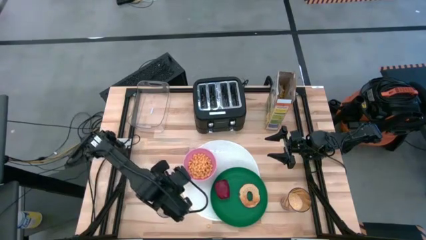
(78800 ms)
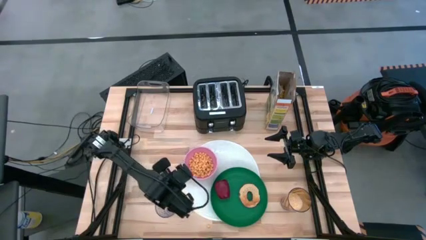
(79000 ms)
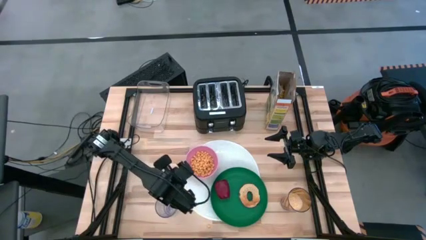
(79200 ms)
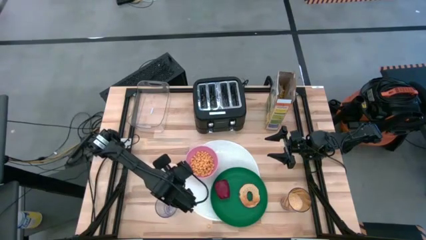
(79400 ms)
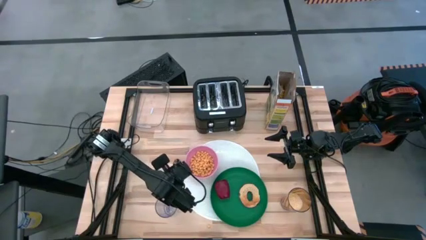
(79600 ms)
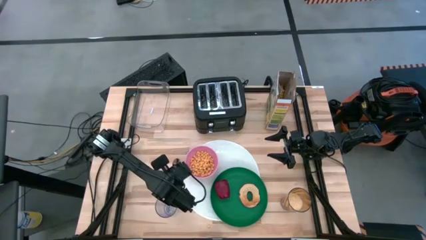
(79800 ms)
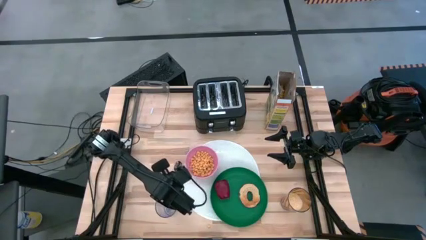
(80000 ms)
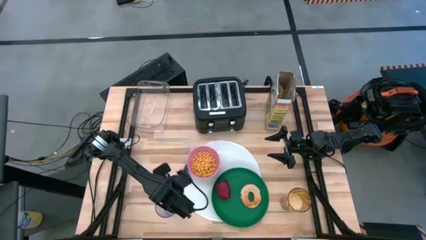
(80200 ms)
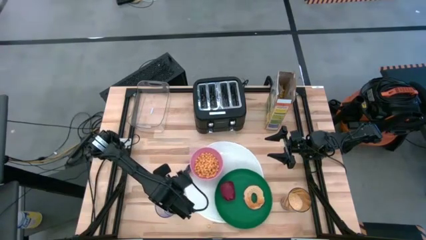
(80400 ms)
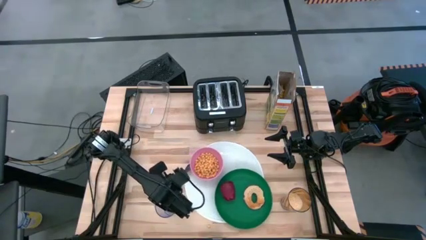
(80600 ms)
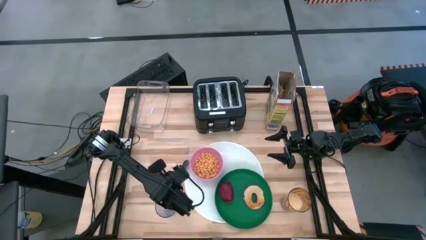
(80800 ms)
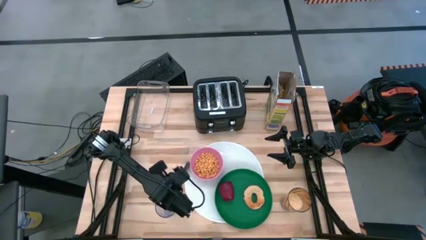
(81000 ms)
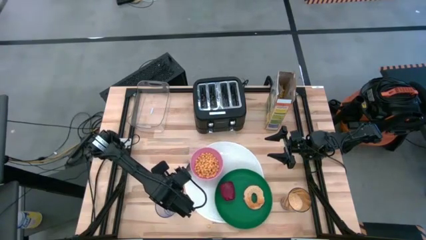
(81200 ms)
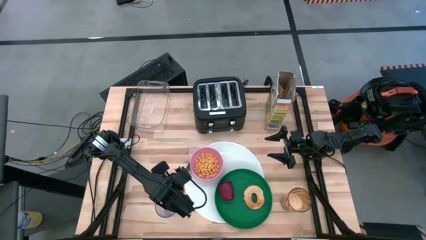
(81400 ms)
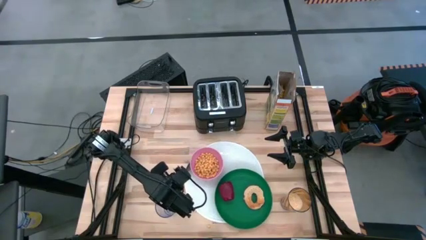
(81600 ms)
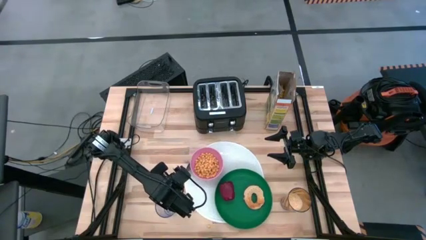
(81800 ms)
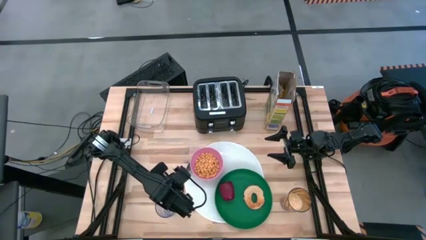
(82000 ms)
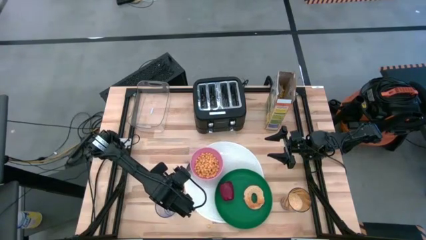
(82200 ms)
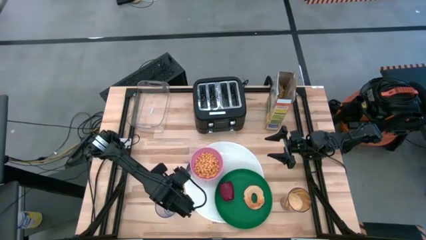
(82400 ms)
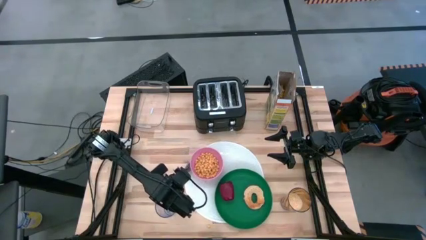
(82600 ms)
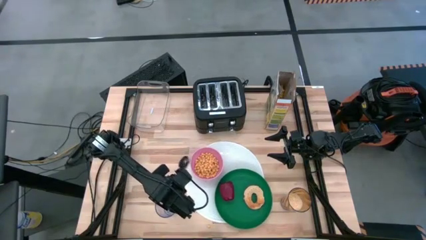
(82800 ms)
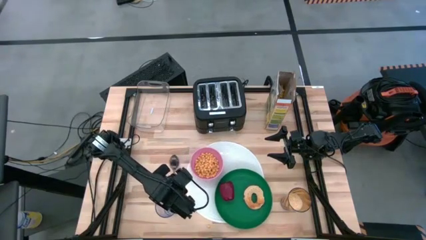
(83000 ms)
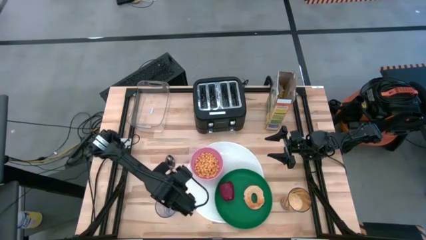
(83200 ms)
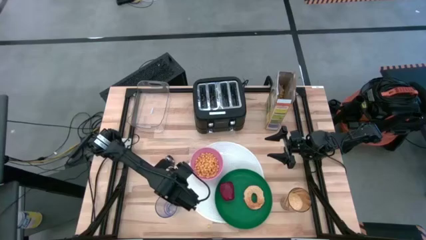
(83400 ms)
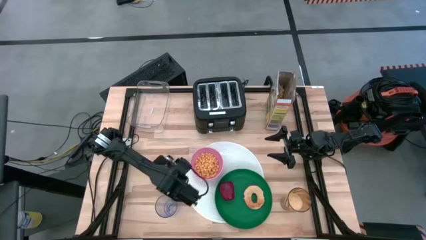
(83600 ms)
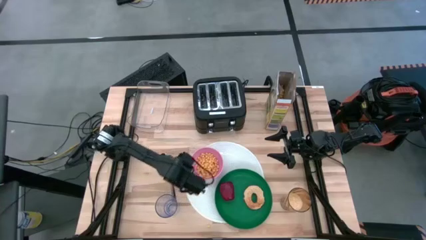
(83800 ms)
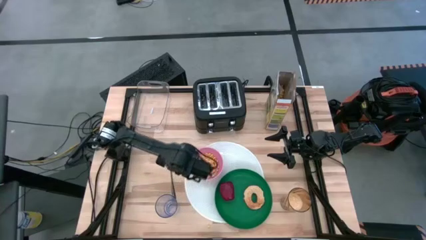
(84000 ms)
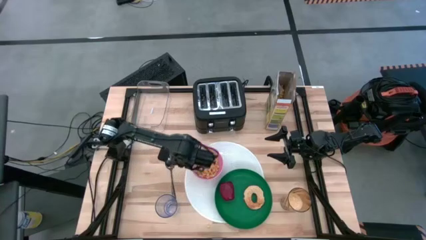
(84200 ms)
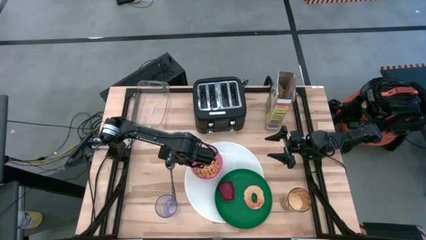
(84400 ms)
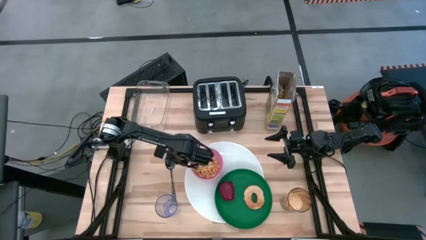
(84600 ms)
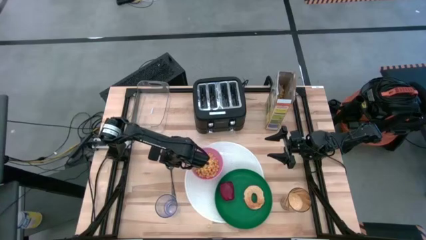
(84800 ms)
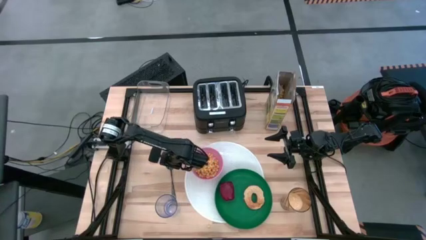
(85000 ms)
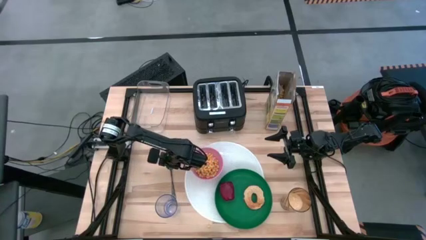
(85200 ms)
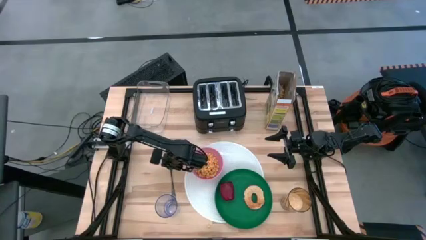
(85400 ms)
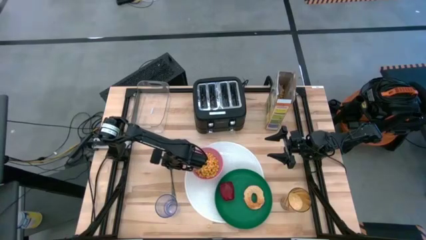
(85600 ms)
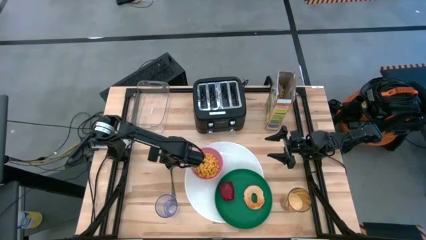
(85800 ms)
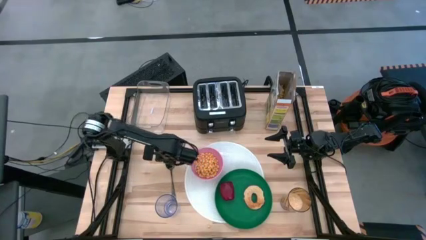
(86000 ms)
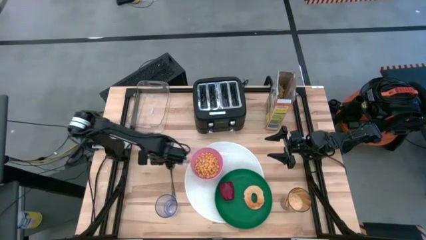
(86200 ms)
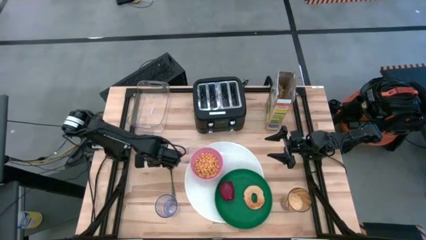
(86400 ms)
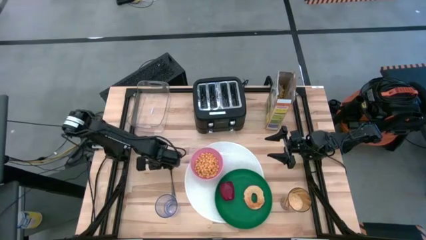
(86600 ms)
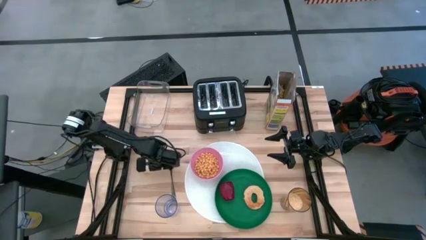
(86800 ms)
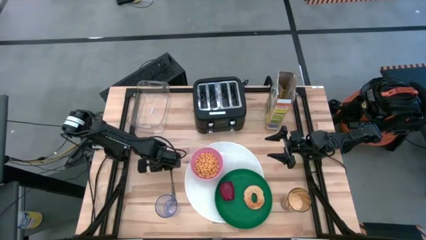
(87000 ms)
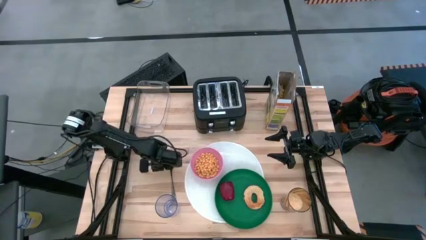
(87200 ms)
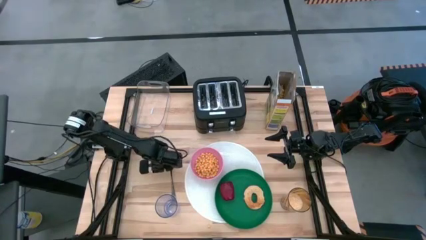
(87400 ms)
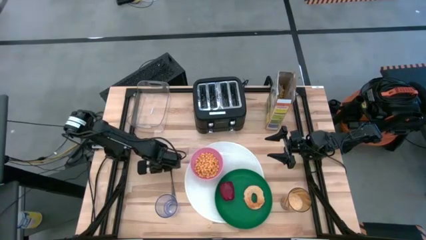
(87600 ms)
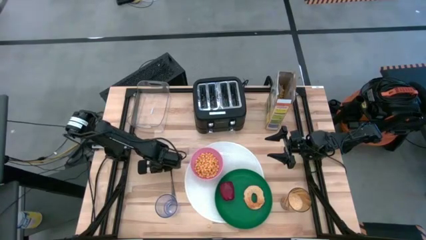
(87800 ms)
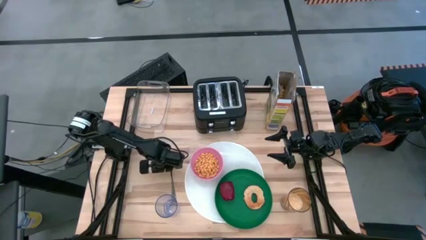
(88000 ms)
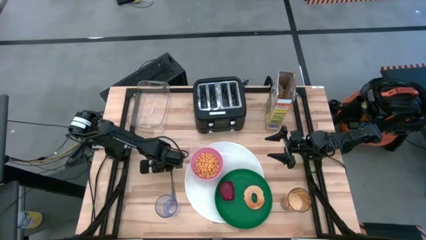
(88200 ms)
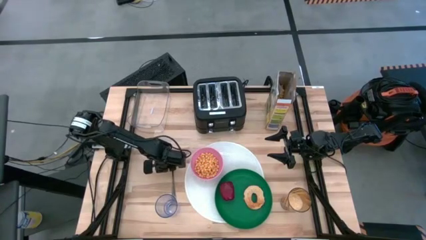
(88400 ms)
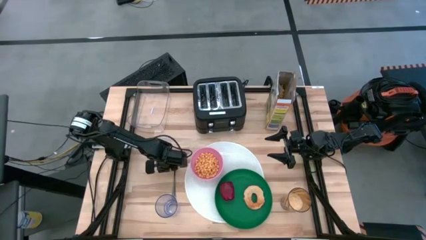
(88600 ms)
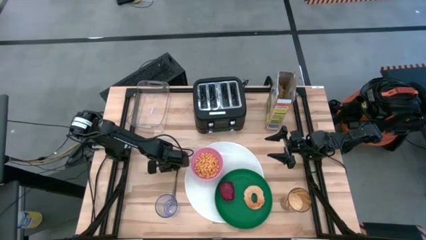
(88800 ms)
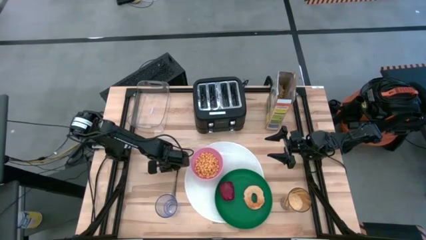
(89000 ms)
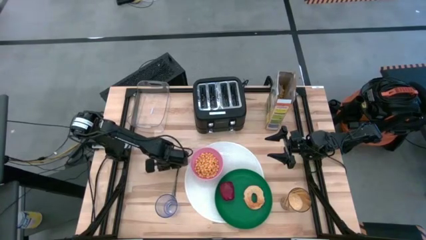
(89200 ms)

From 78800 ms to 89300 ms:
Task: Arrange a breakfast setting
Put the silver spoon on the left side of the white table mat

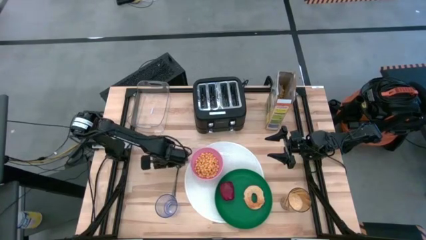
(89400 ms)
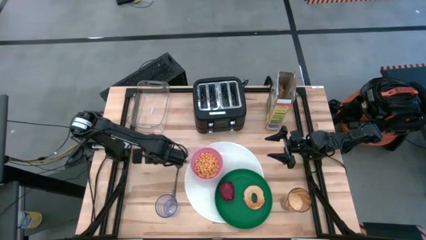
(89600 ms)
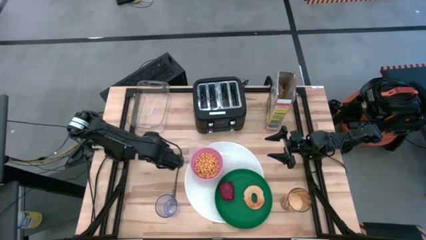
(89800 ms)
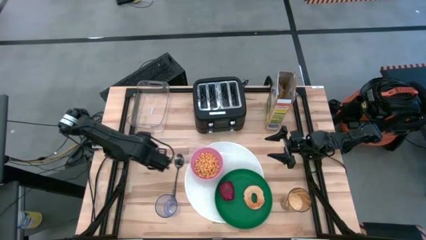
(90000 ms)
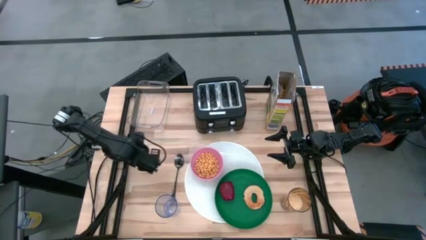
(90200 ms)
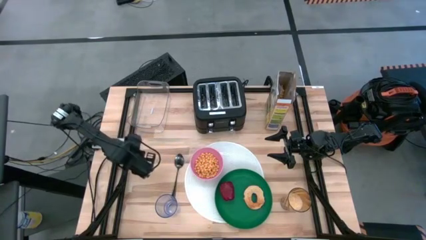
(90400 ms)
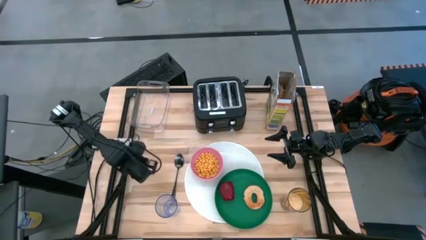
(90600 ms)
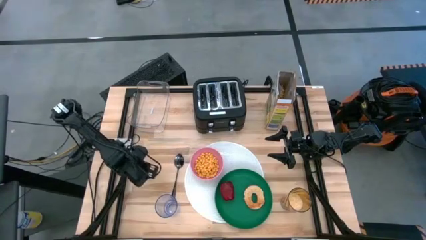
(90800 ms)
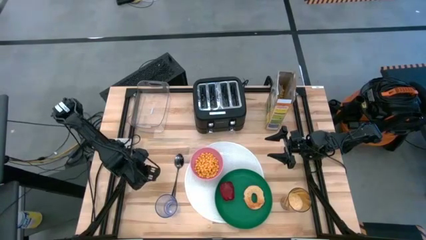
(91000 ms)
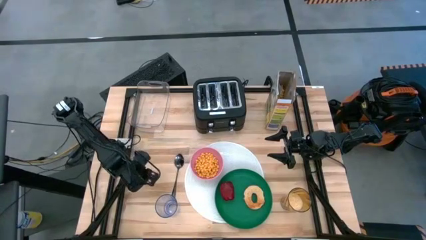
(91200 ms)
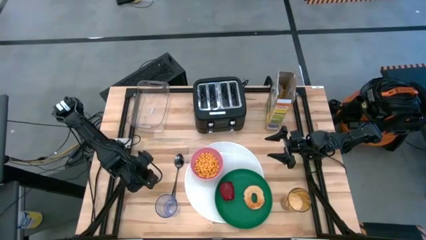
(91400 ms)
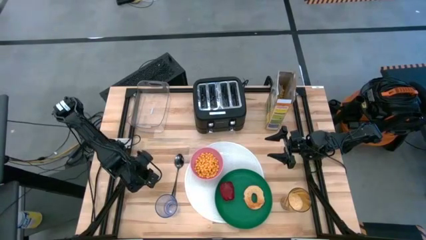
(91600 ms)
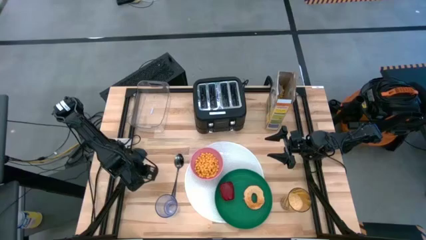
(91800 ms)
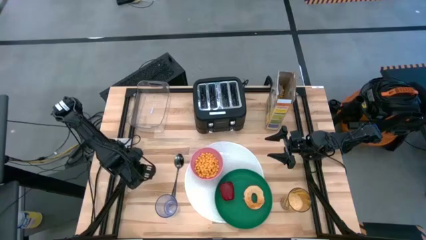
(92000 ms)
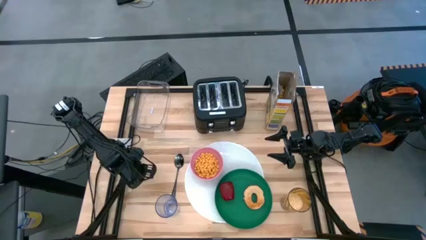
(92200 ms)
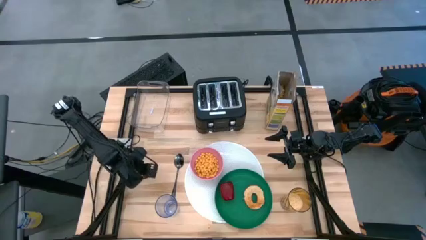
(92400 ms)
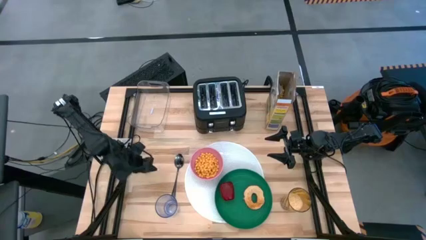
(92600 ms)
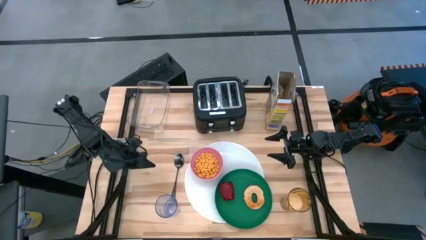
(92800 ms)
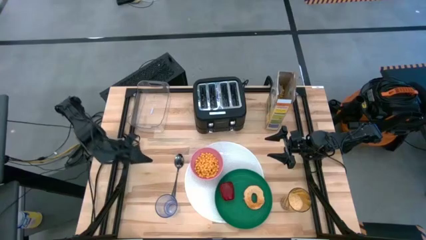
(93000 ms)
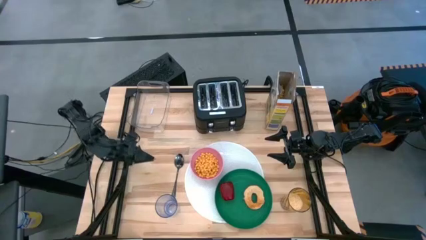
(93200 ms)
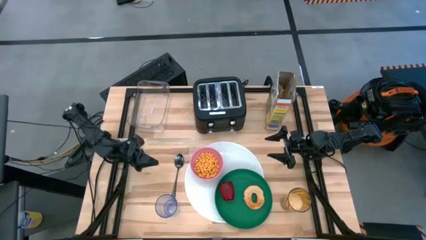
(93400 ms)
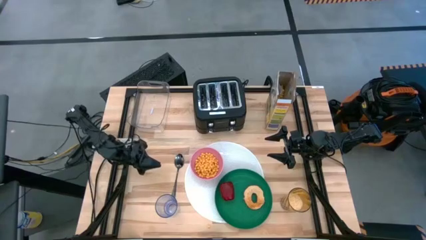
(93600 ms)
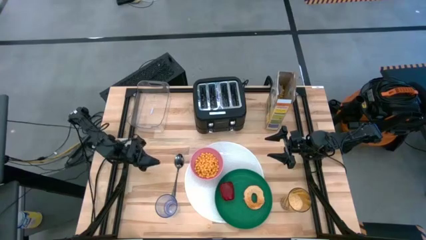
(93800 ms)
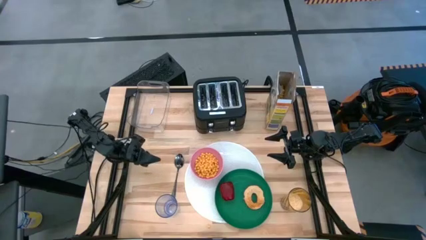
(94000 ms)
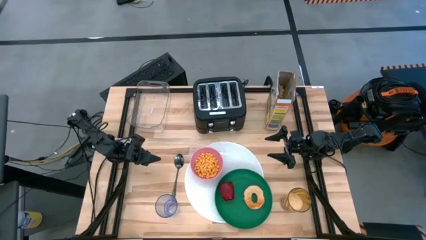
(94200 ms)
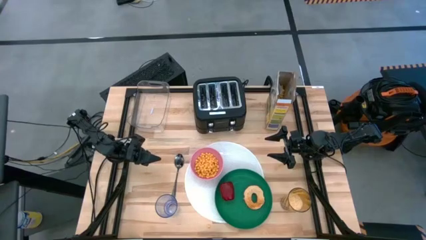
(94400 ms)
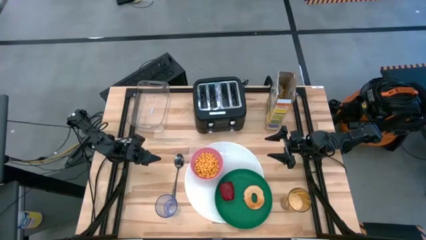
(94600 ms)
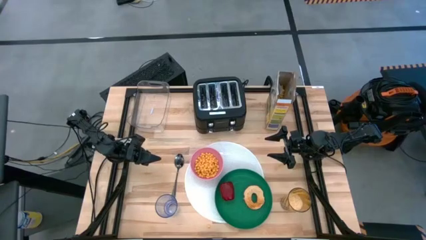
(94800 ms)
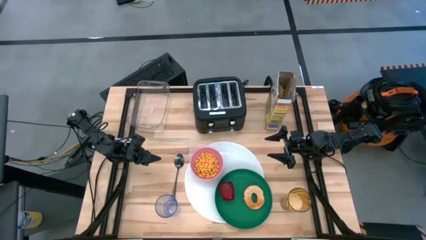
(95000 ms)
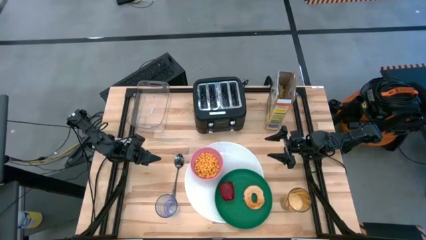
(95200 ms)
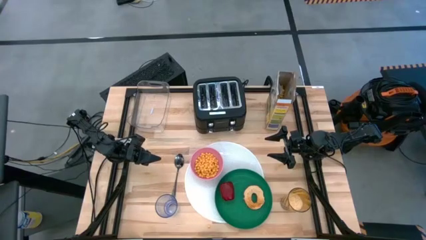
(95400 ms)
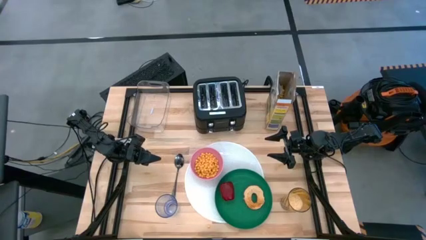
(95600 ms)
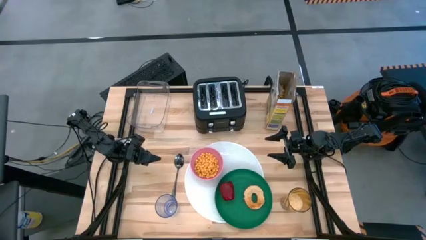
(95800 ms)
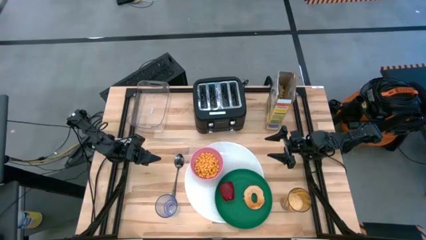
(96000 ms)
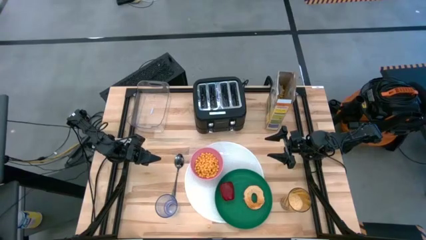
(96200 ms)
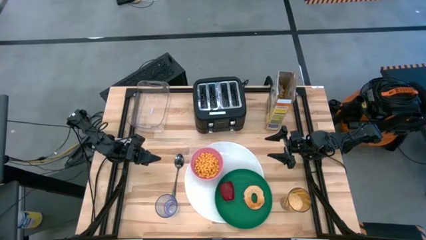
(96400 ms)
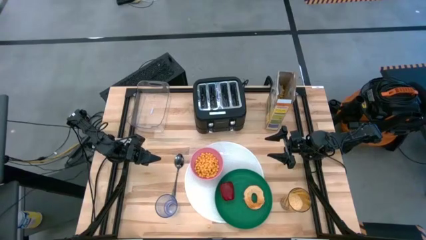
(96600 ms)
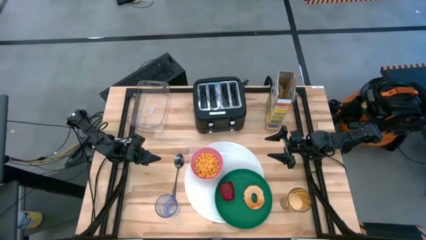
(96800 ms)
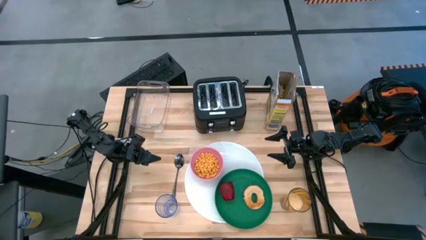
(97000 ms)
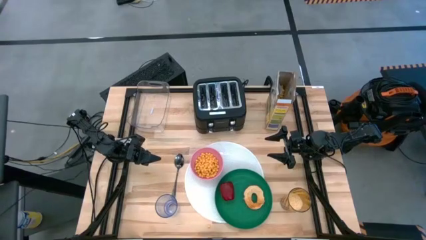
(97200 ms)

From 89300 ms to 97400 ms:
Return to Home Position
